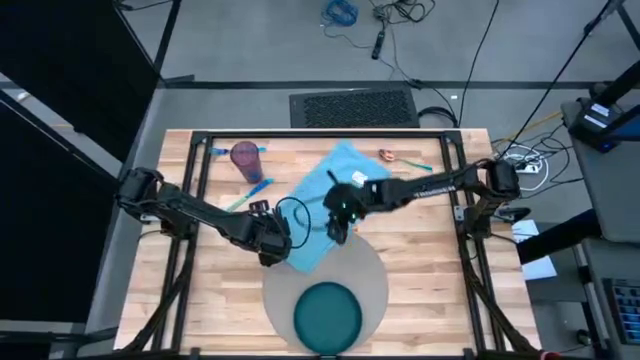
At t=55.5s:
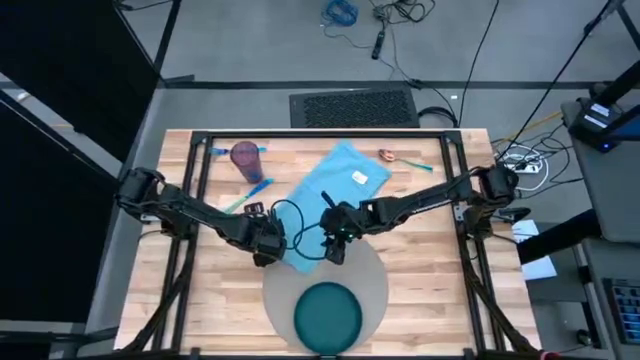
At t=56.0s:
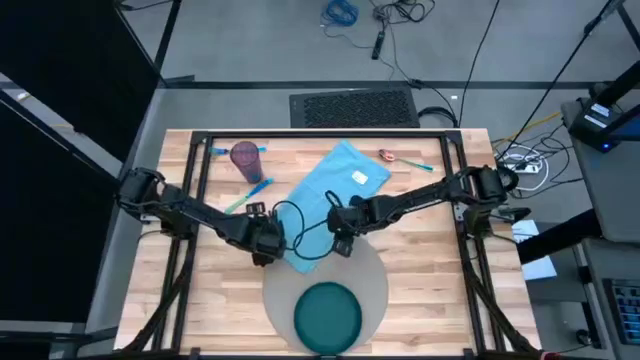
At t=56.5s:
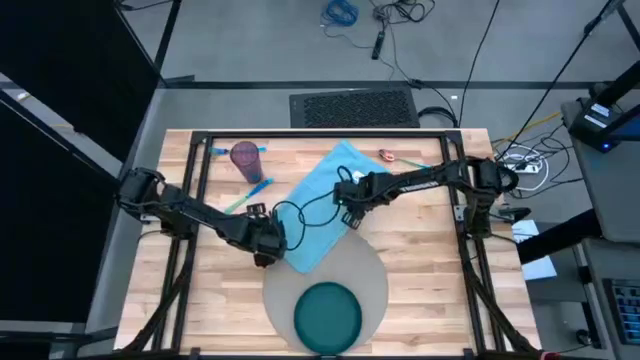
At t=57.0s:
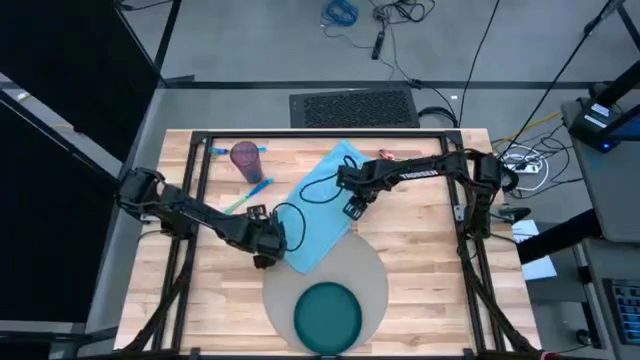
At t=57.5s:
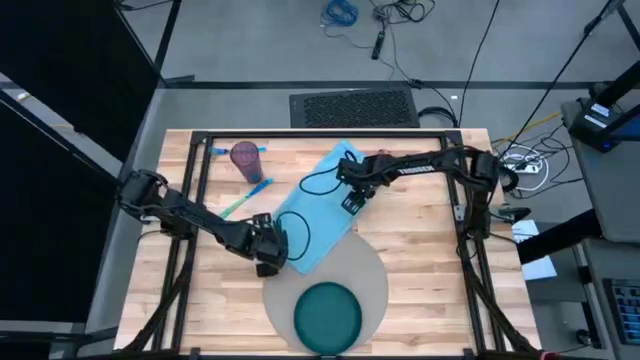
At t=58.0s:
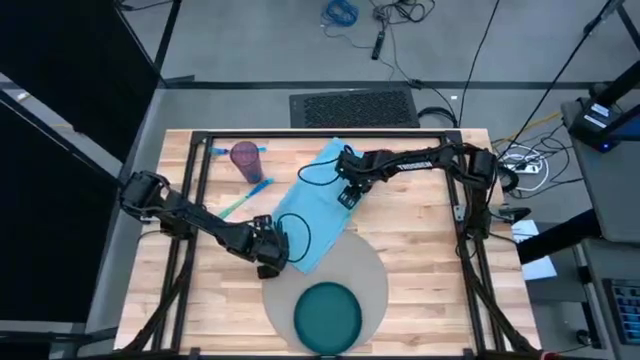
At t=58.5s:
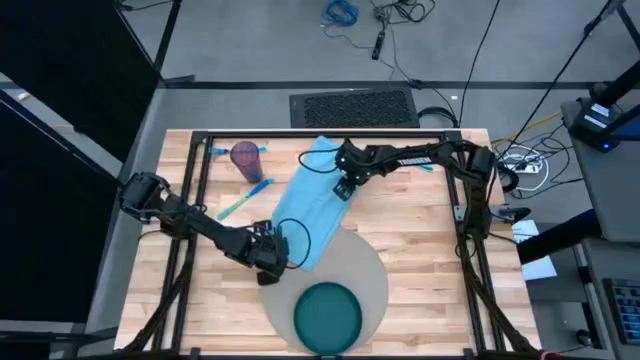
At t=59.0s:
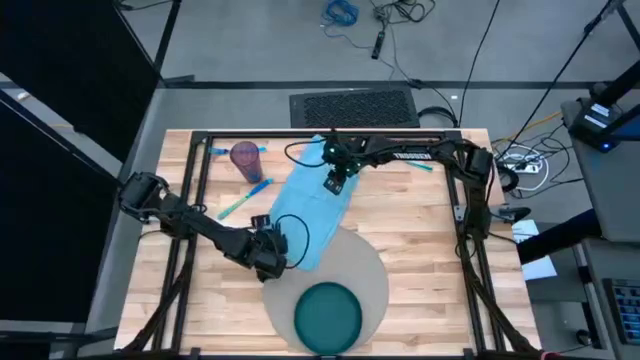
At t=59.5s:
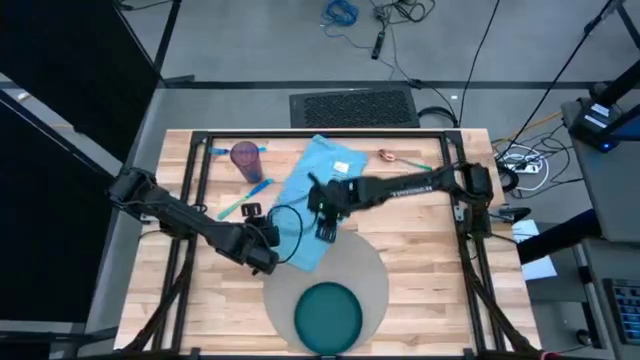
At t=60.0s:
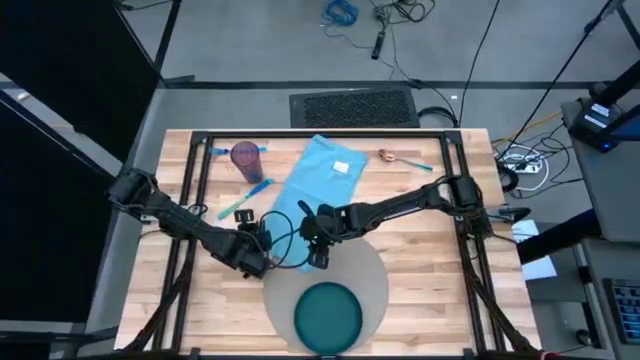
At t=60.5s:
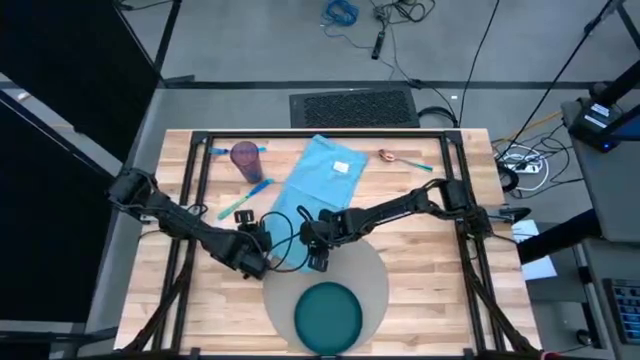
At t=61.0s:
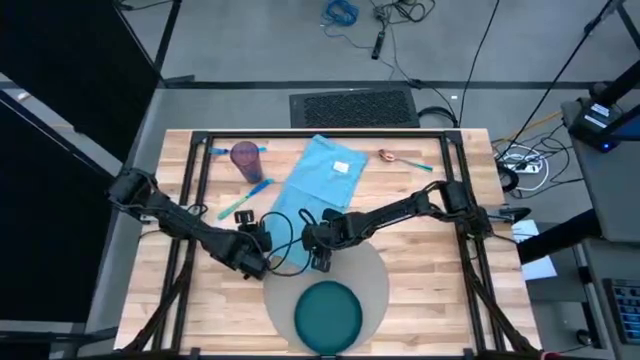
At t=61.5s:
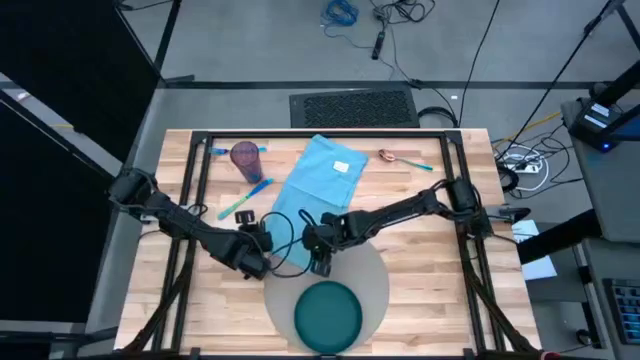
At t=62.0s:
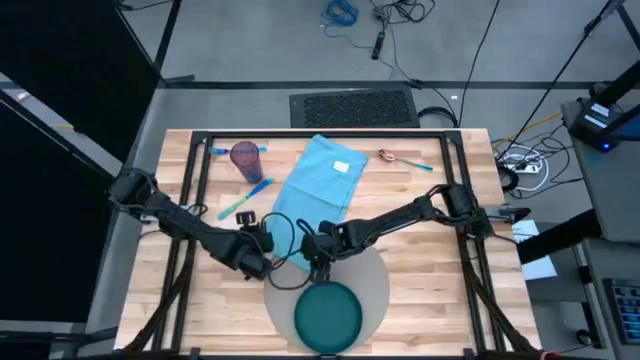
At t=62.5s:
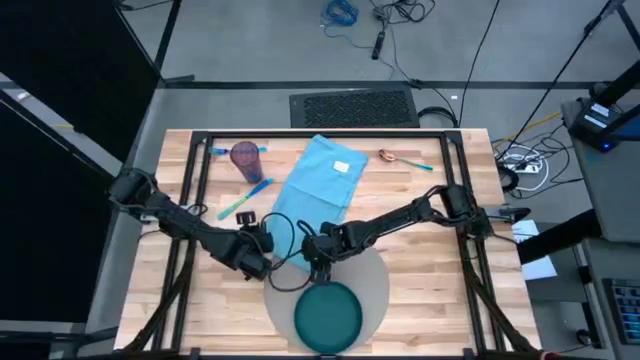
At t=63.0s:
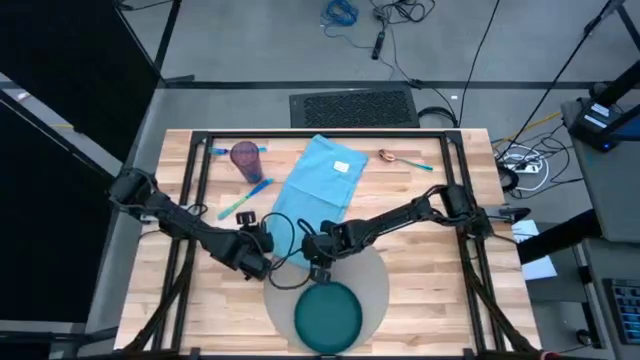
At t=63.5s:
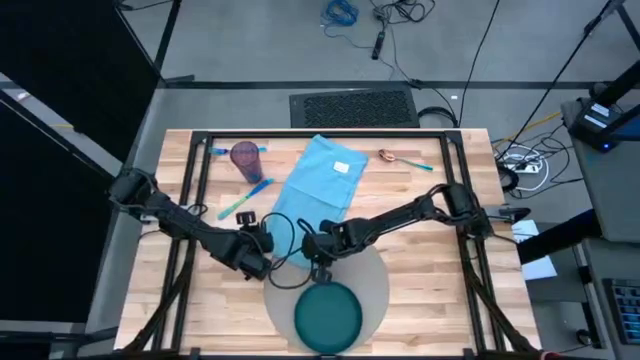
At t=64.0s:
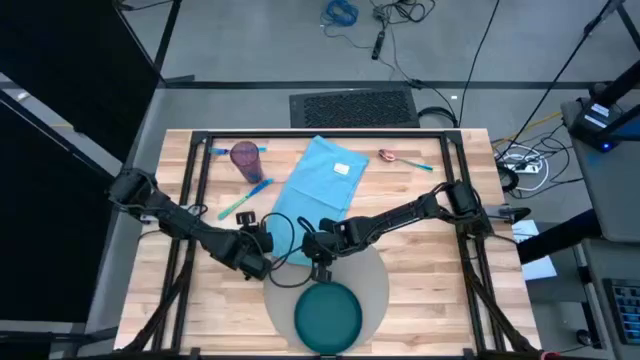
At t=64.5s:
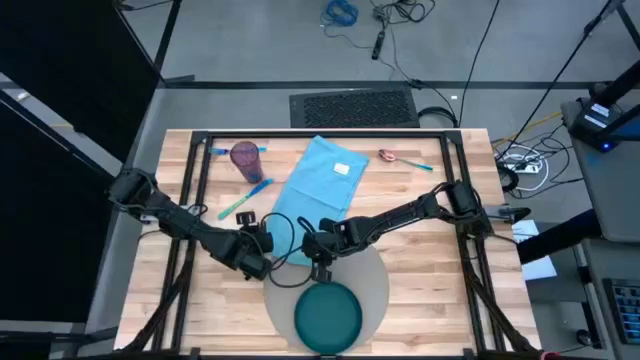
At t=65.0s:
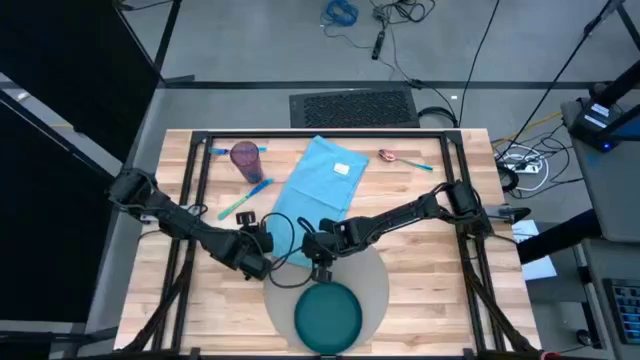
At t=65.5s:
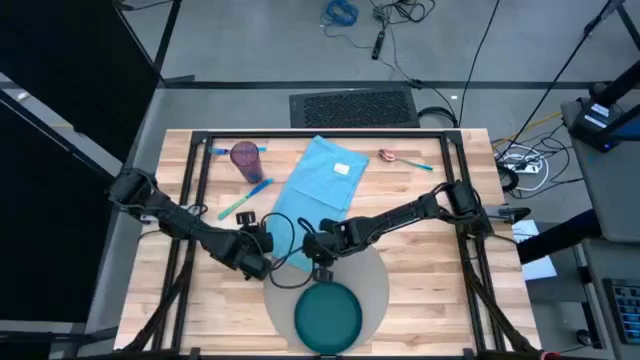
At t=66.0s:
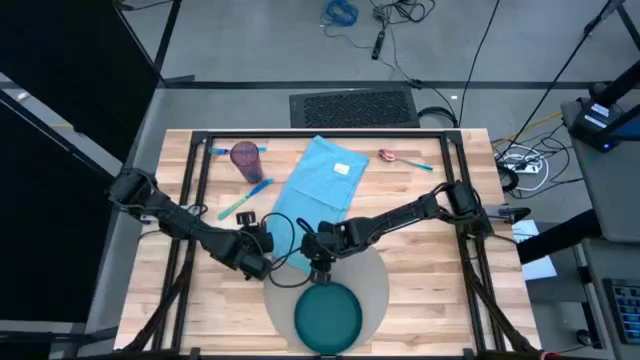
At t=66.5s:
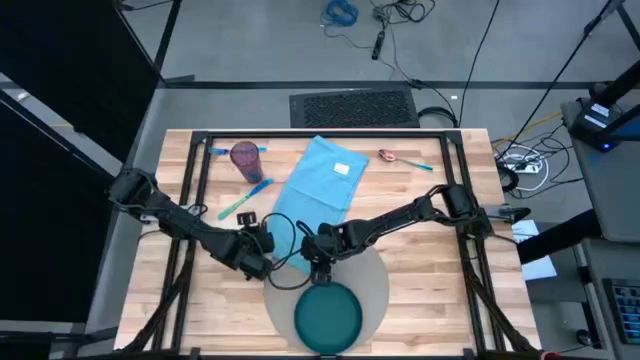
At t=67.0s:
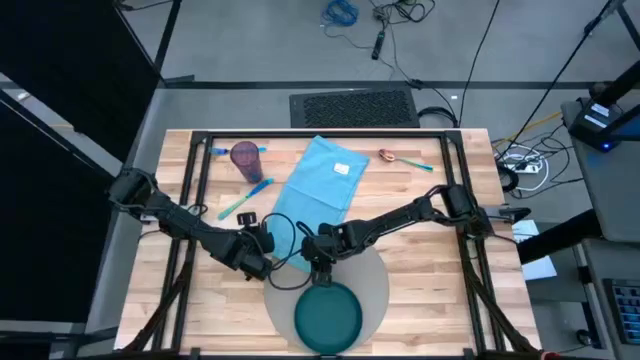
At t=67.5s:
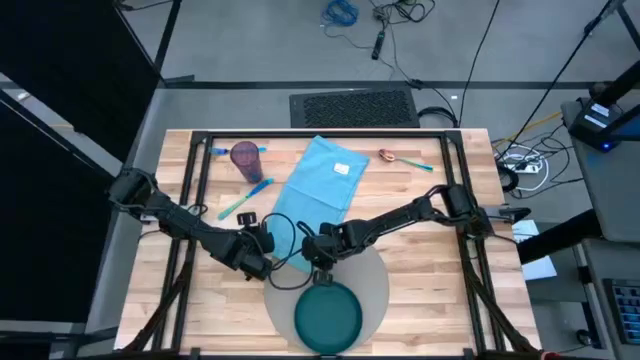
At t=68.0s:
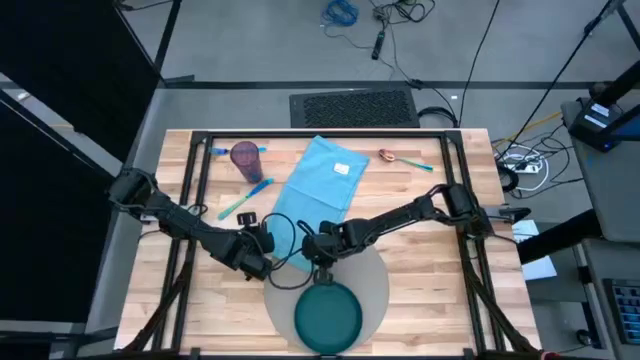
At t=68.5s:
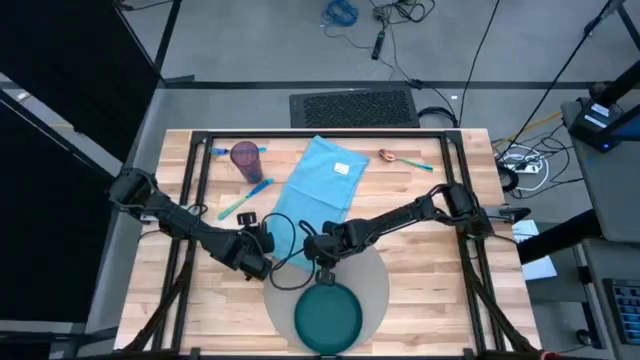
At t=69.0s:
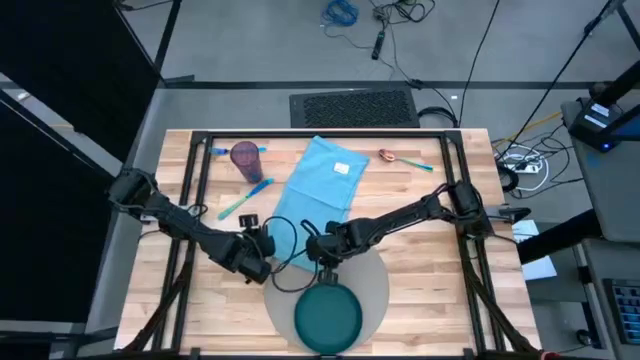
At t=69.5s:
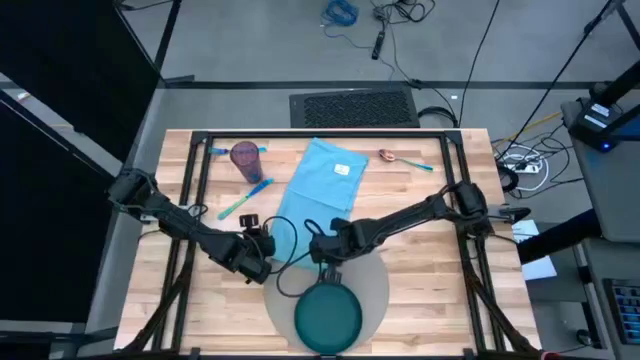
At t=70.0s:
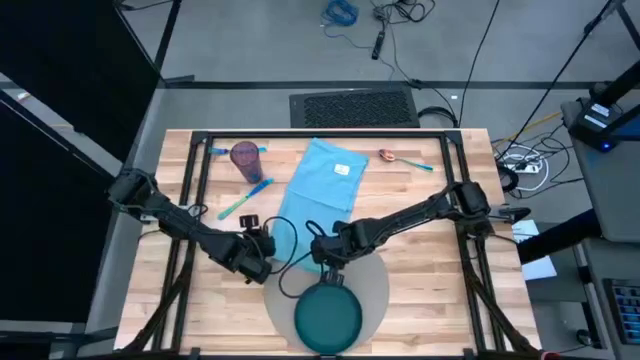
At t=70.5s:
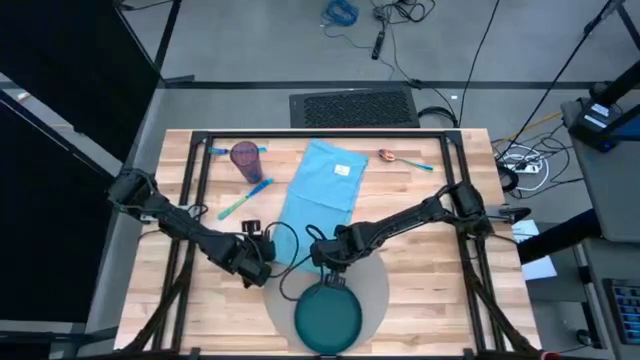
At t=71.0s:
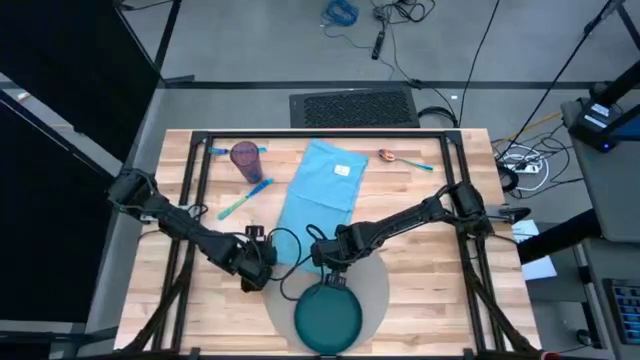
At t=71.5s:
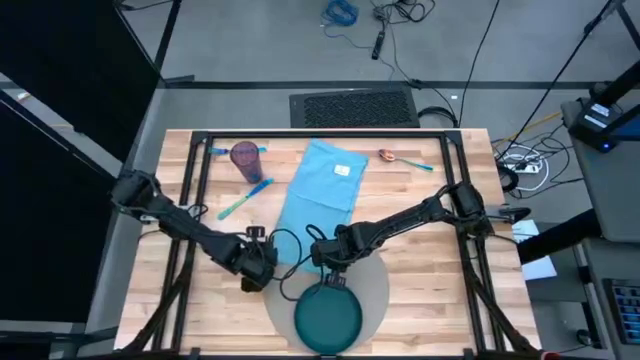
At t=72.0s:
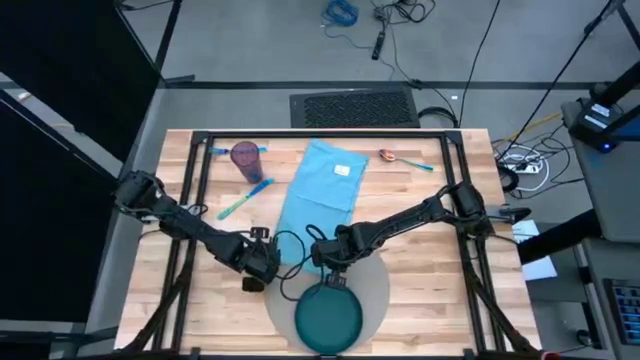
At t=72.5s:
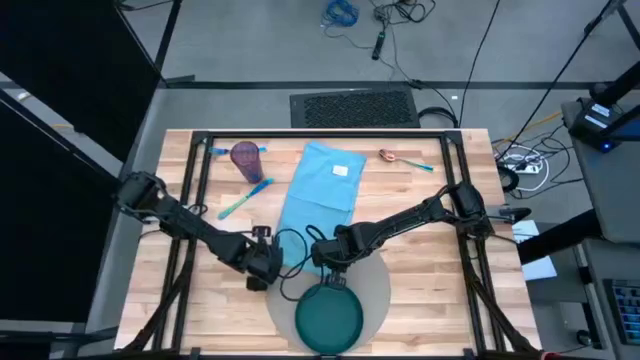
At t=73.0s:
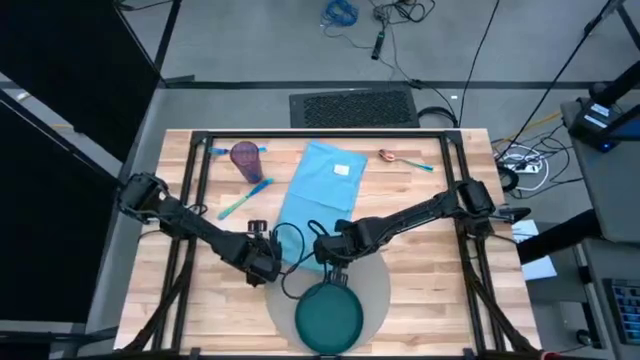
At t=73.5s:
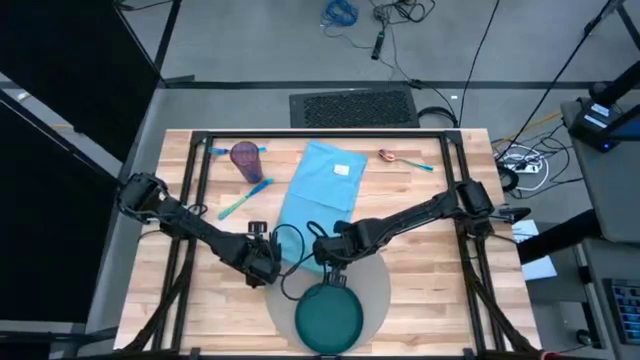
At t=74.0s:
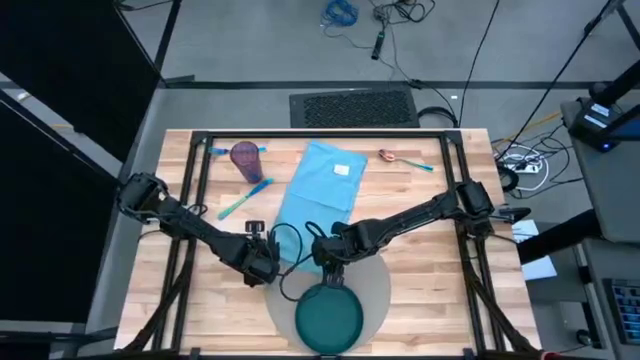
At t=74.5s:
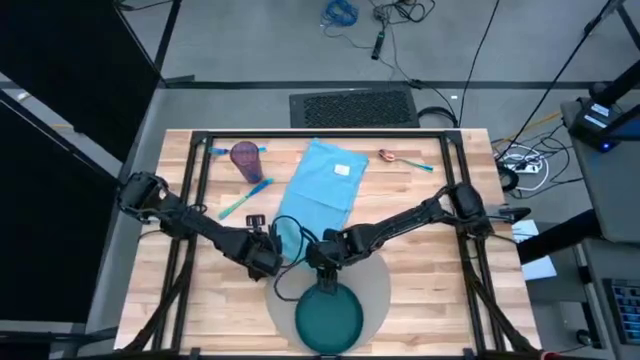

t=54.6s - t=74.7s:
Task: Set table place
Fold the blue napkin

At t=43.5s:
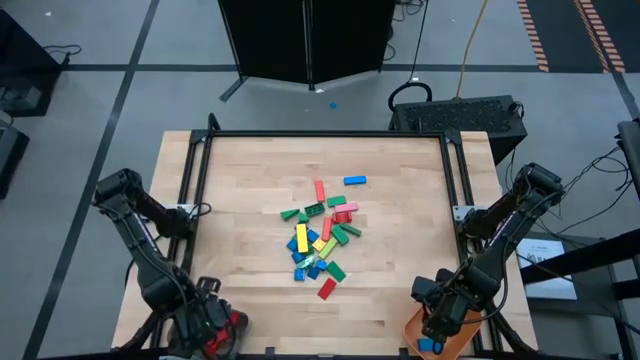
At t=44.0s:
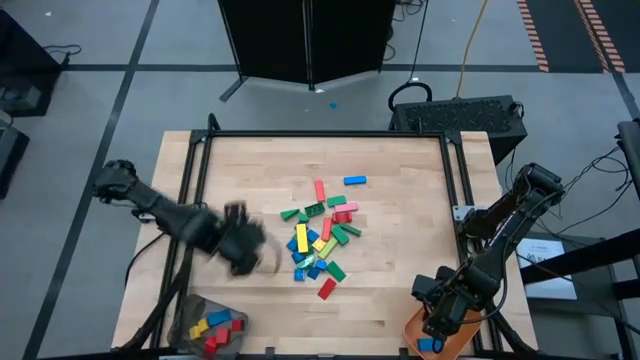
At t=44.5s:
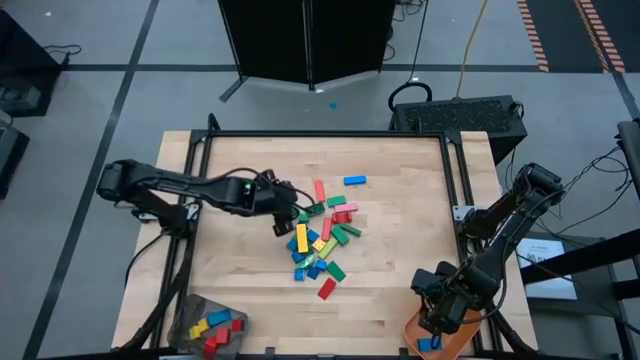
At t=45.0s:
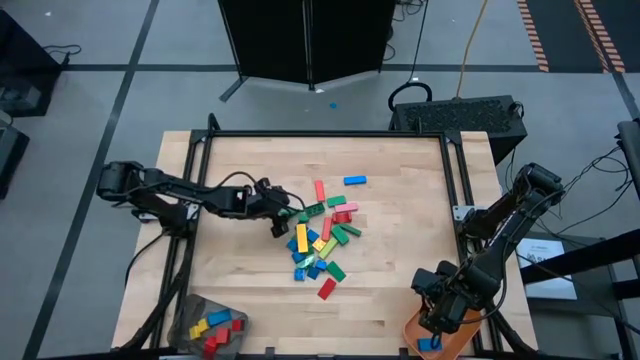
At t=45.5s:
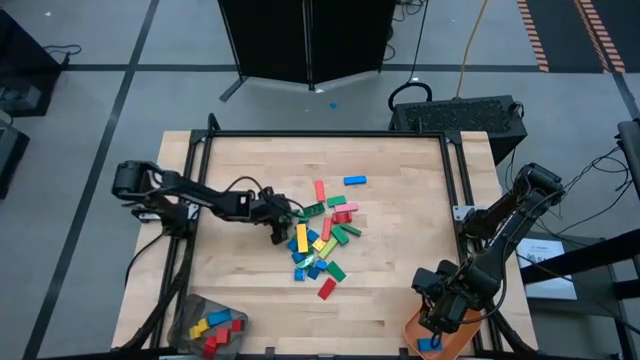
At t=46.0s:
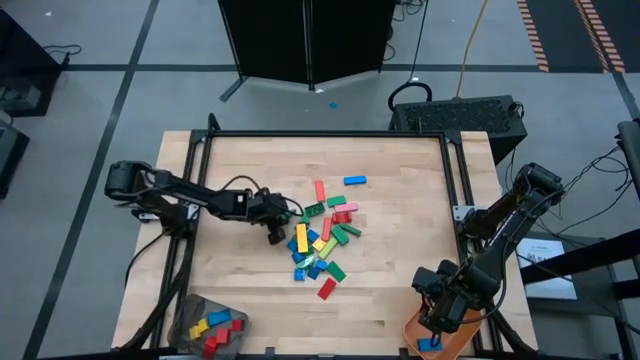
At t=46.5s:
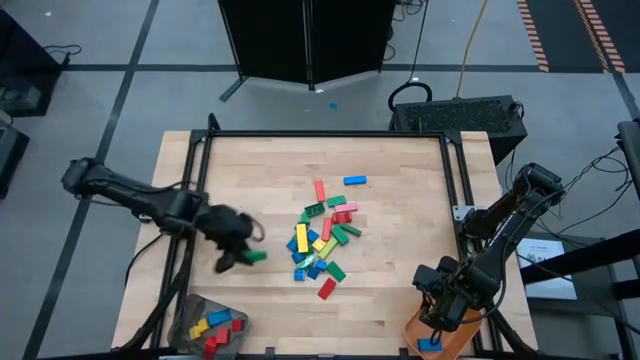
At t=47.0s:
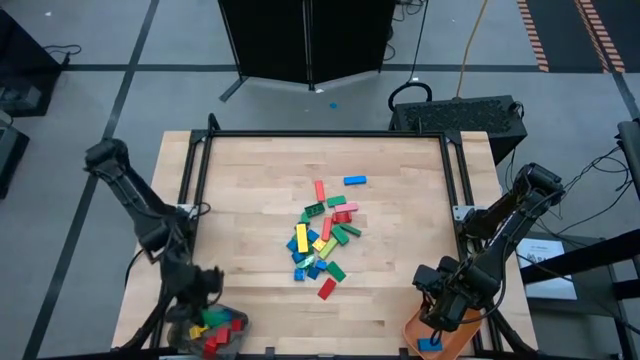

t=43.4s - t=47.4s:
Task: Sort blocks by size
Put the green triangular block into the black bin
